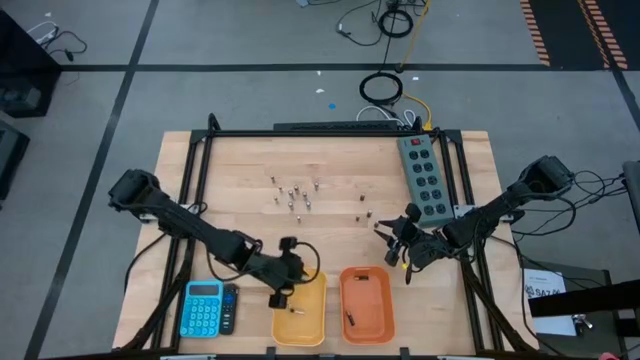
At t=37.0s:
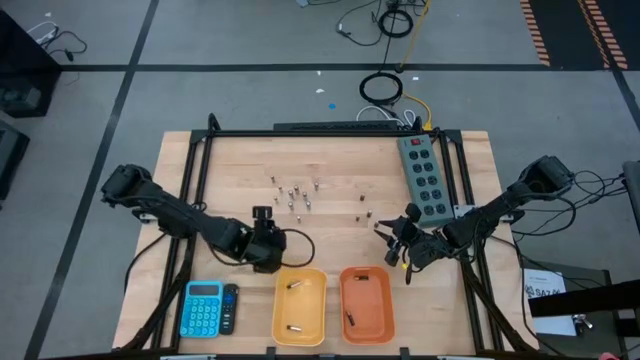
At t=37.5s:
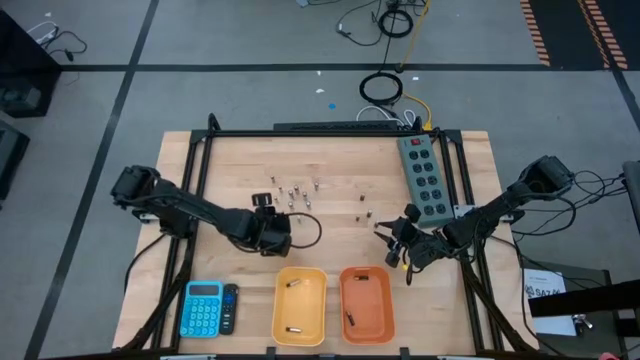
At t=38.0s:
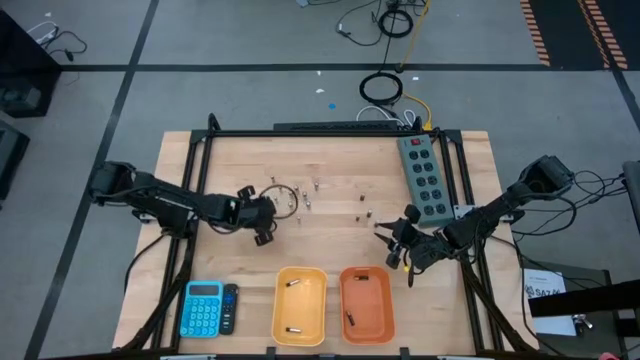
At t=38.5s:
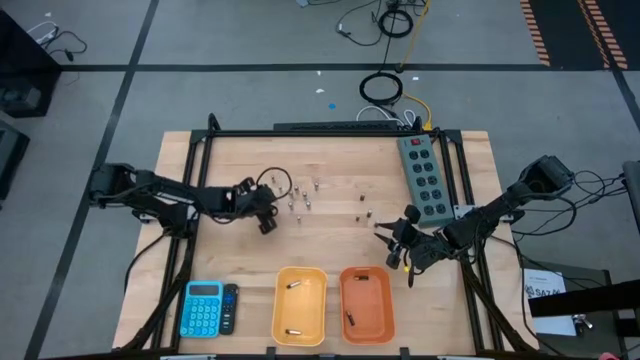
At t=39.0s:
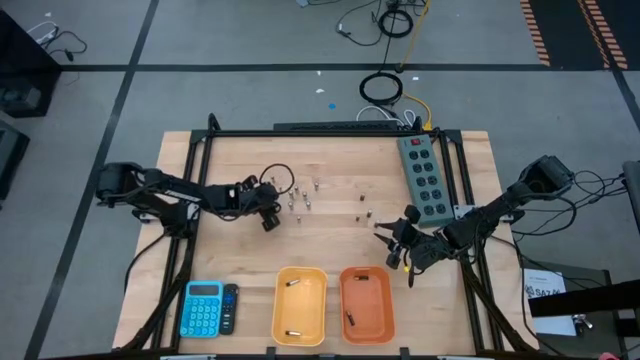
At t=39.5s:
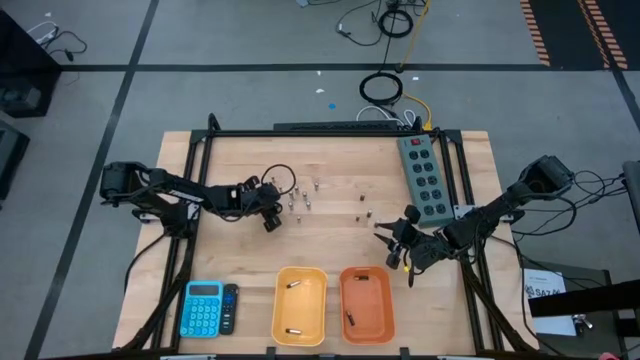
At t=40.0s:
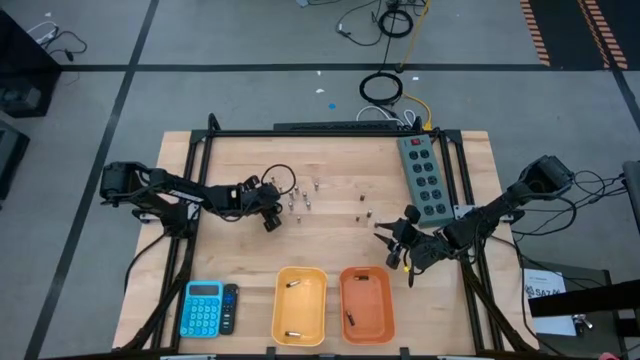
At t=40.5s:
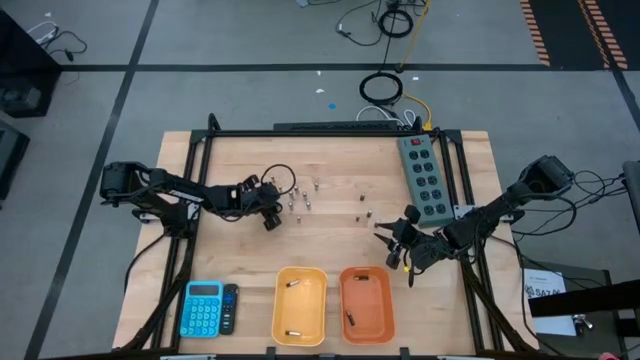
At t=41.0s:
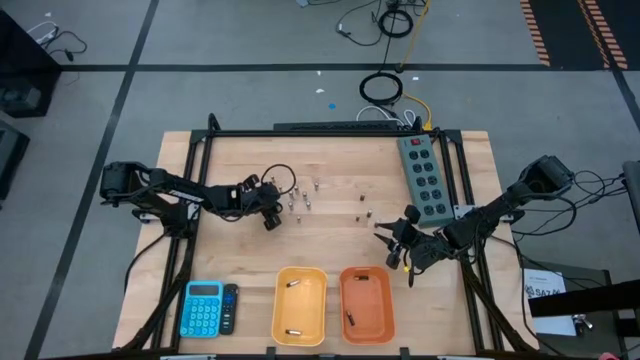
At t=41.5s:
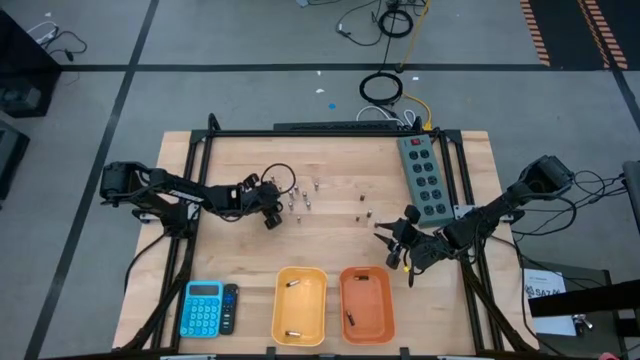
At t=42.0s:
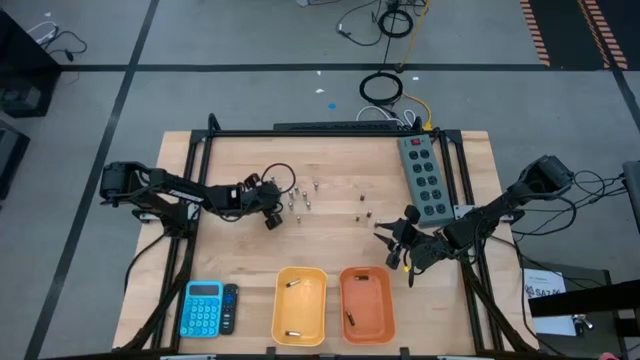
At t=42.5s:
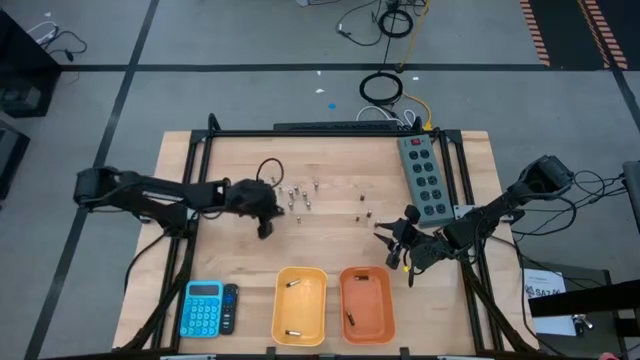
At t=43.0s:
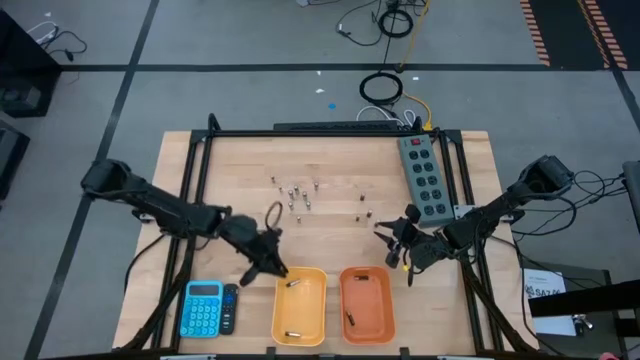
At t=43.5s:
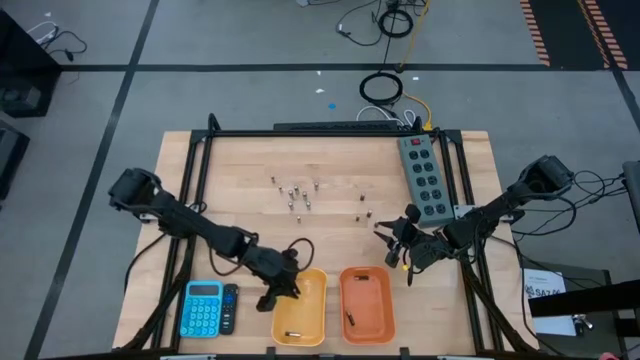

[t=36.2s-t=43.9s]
Task: Sort batteries
Put the silver battery into the yellow bin

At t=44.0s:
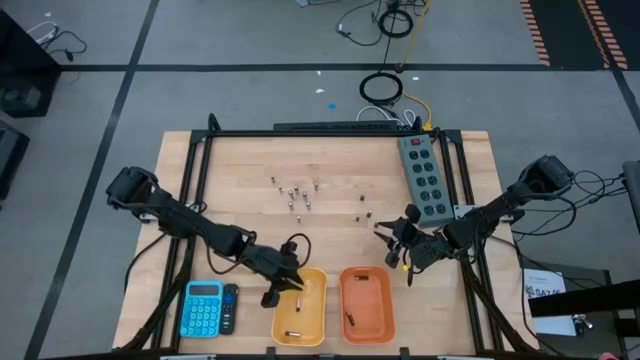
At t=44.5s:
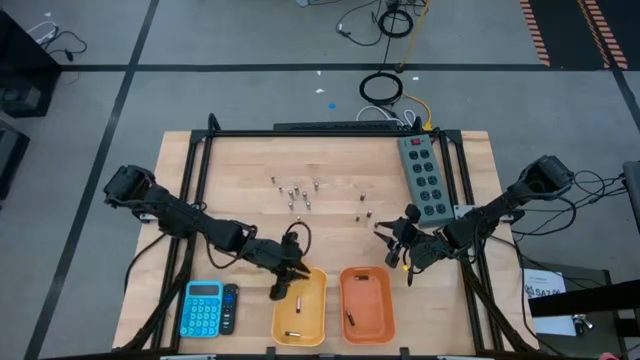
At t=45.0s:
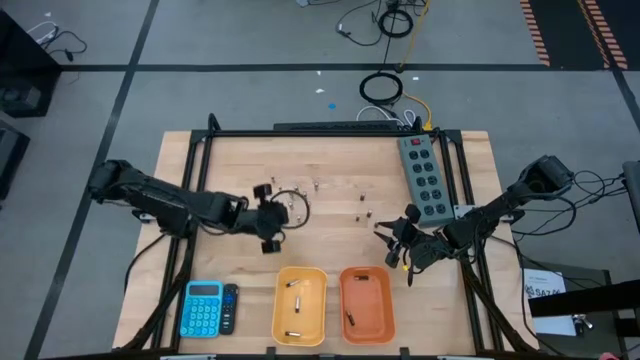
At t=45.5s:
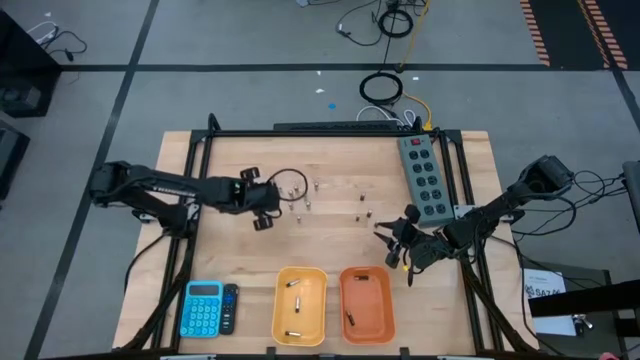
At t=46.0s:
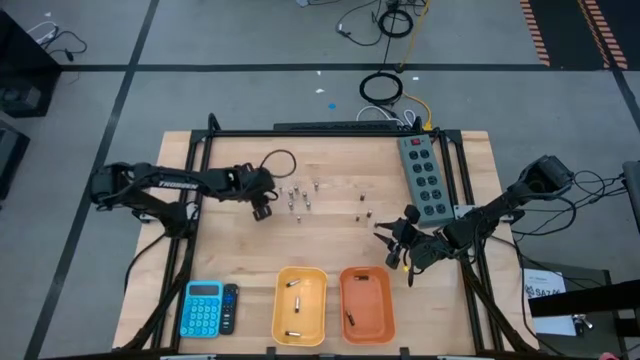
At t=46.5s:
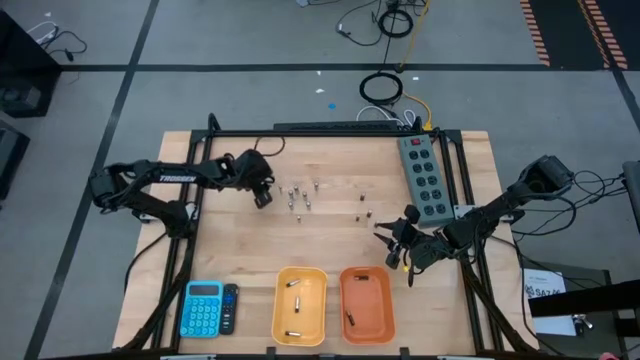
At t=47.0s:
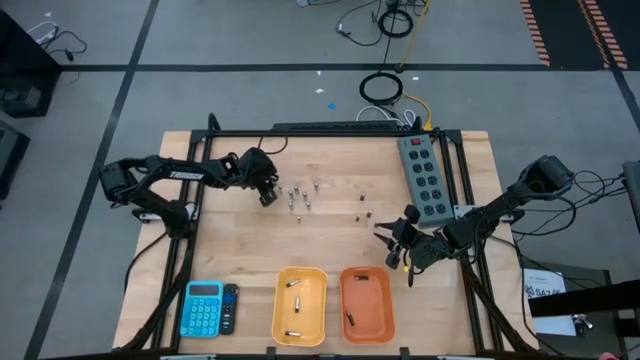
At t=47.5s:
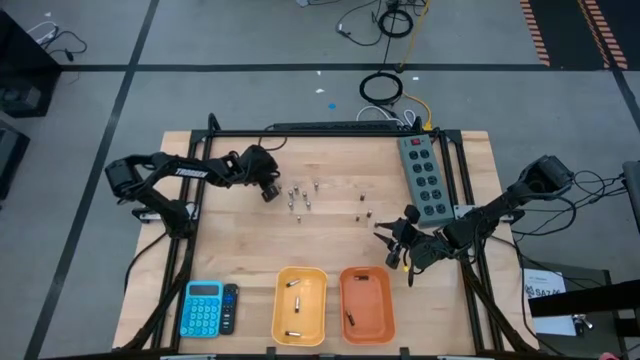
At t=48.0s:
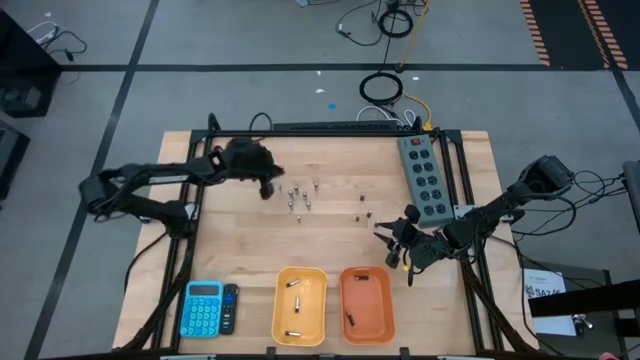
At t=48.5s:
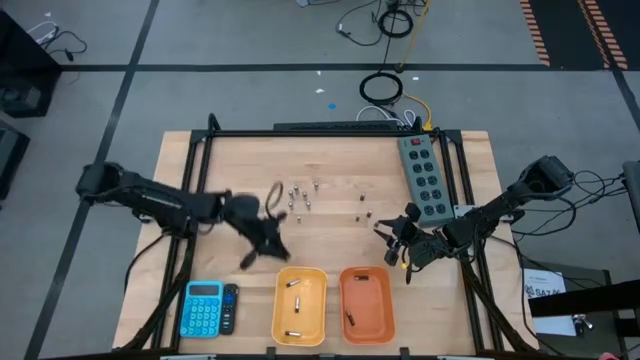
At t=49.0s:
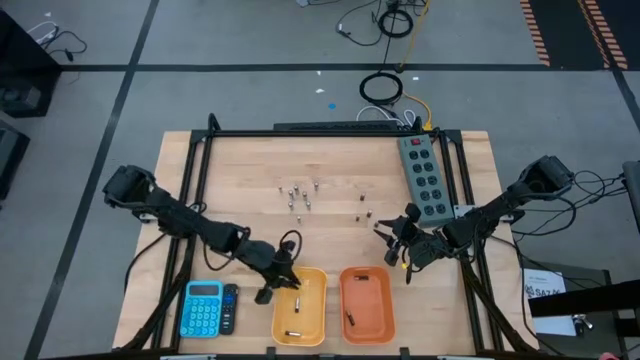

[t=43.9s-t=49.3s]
Put the silver battery into the yellow bin

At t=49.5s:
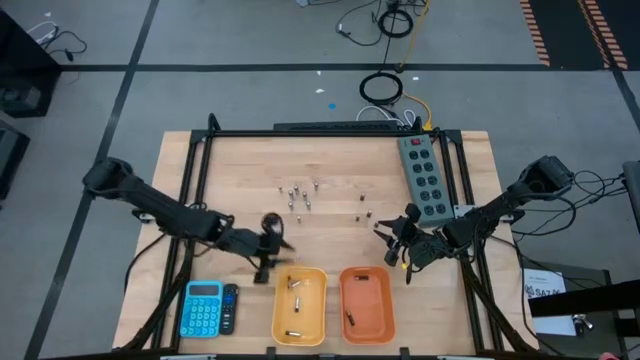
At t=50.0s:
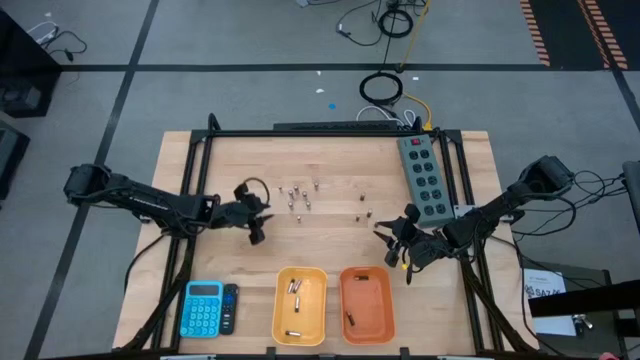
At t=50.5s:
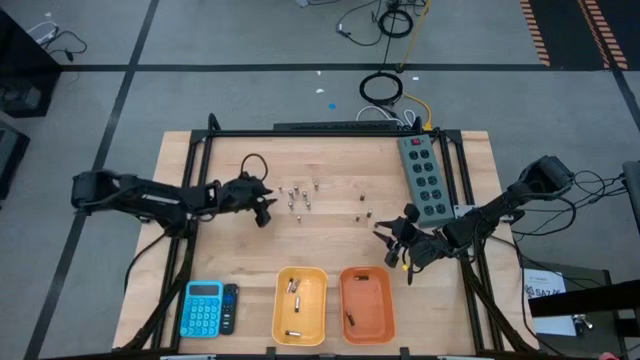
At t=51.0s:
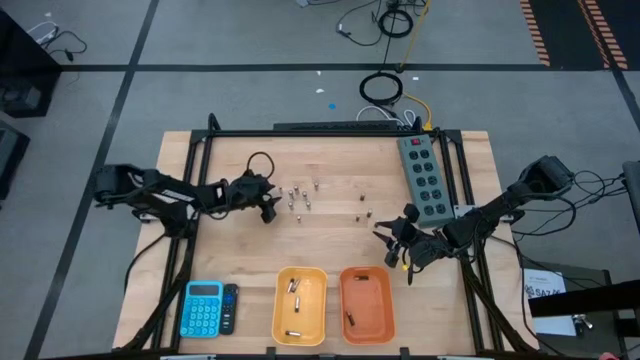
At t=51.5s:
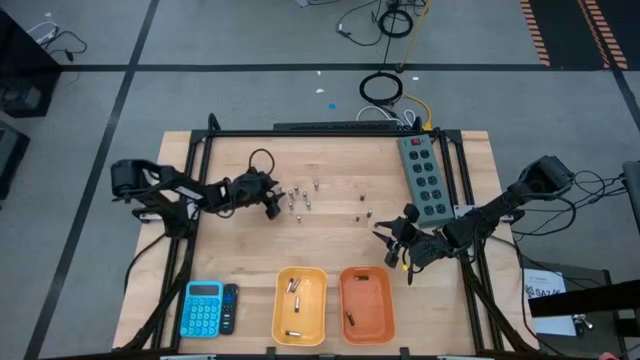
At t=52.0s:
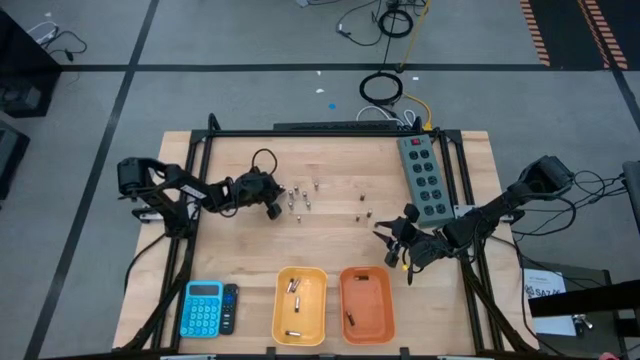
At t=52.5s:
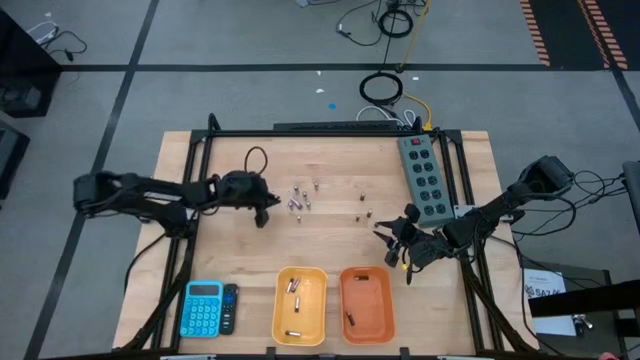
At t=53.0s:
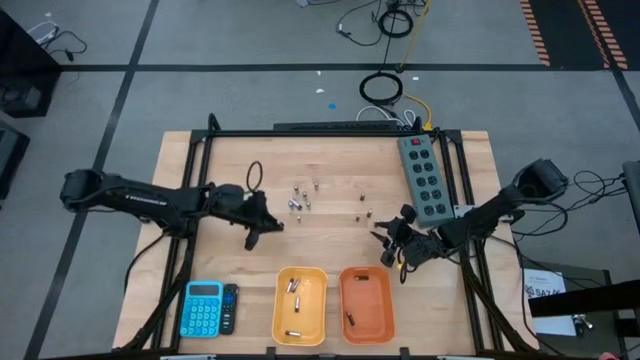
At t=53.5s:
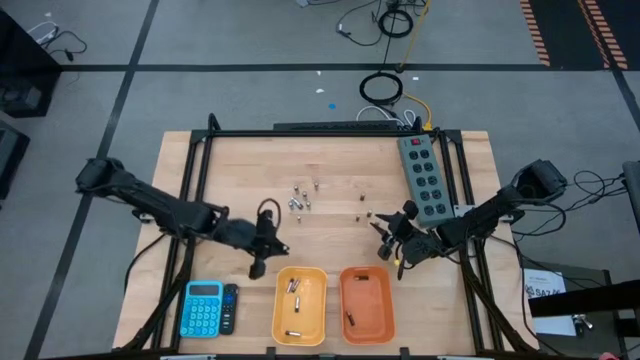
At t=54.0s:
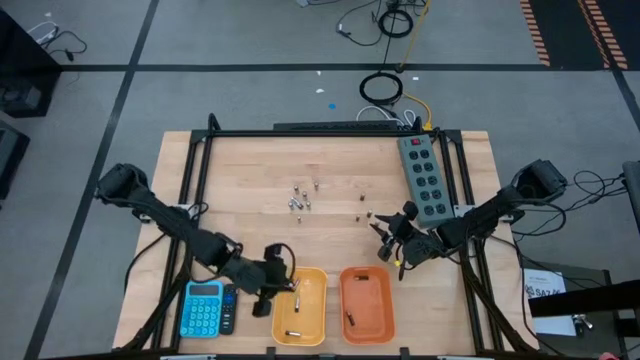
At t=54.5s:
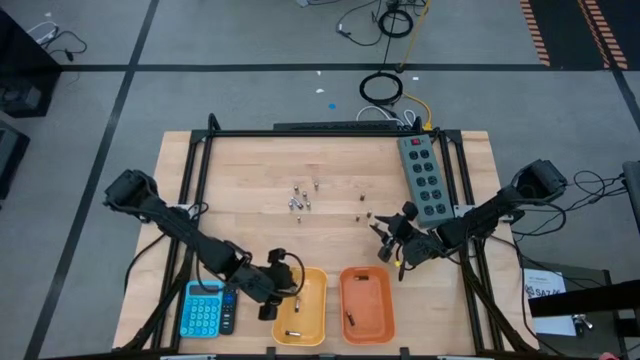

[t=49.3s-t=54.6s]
Put the silver battery into the yellow bin

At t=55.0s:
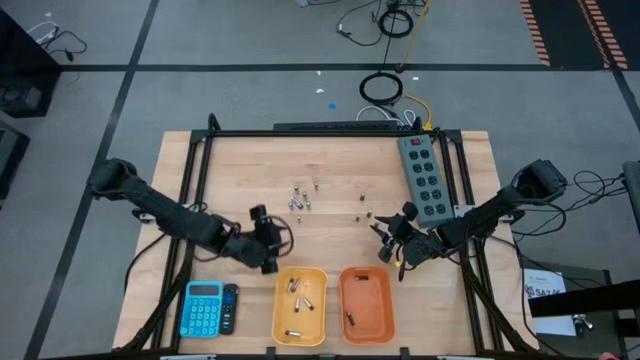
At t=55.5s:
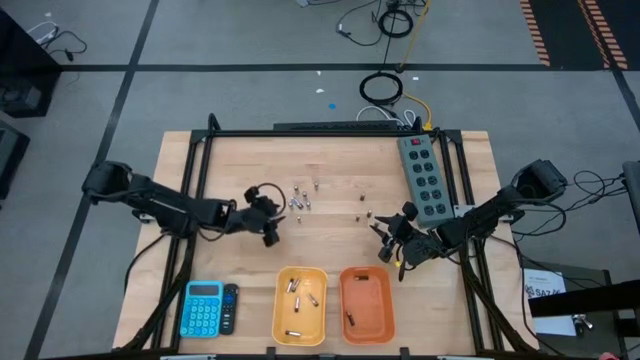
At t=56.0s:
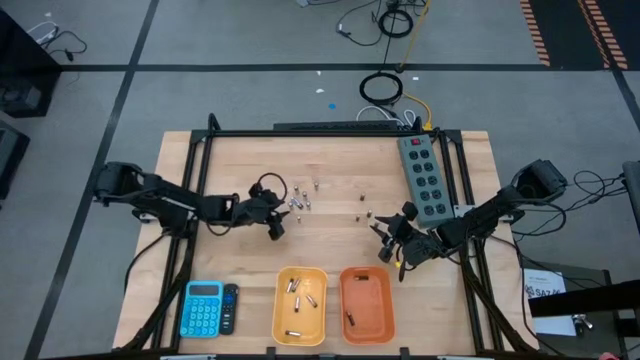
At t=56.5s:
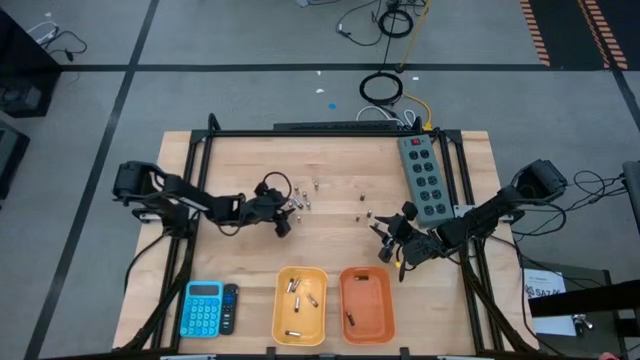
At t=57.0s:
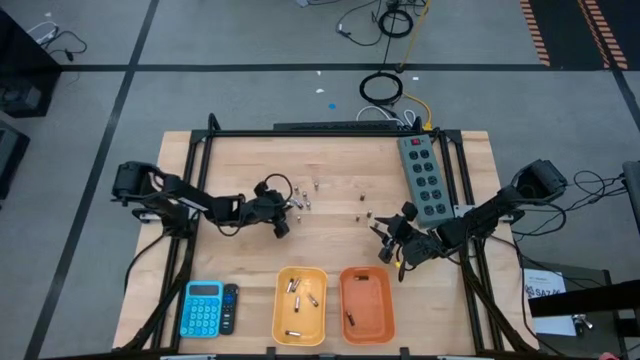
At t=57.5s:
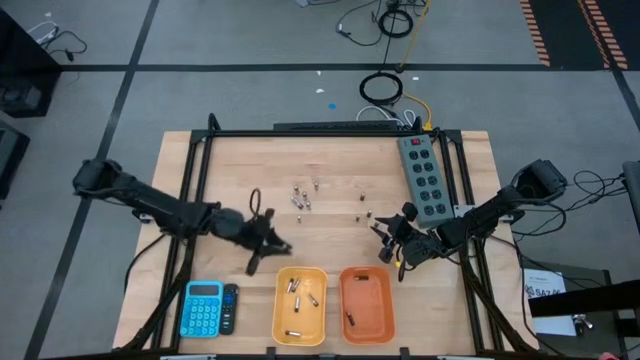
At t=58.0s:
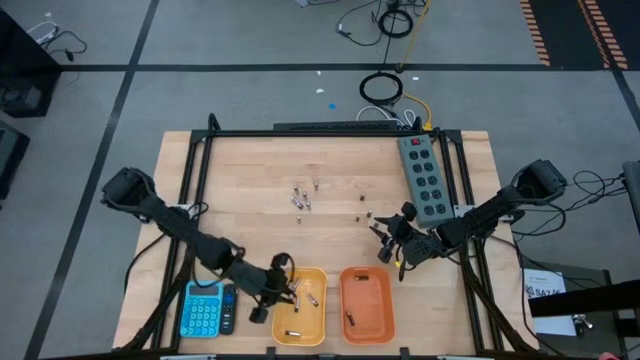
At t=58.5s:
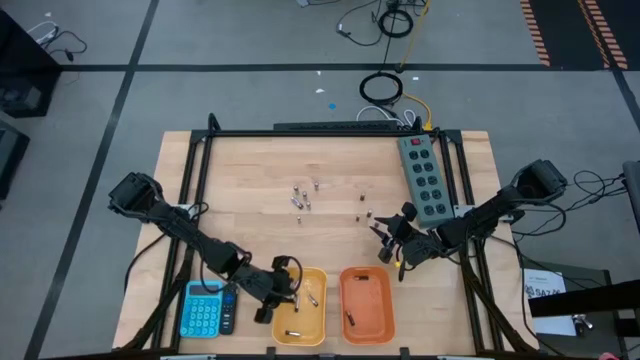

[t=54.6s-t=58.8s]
Put the silver battery into the yellow bin
